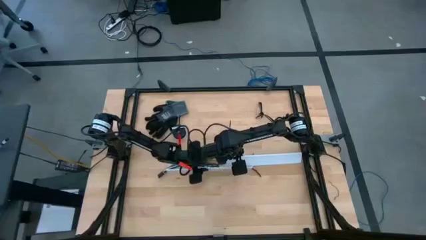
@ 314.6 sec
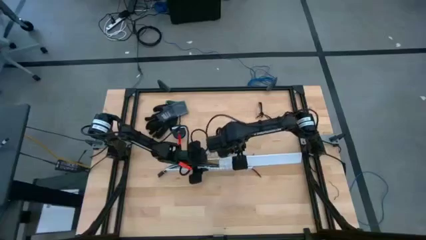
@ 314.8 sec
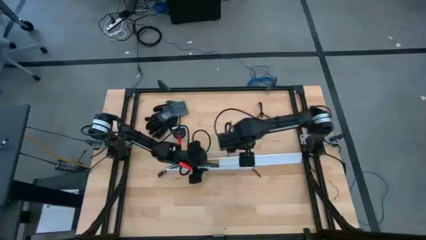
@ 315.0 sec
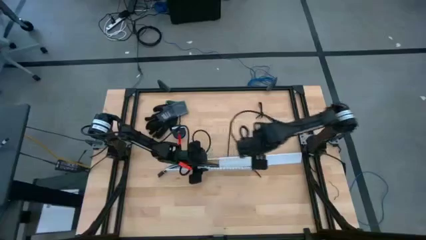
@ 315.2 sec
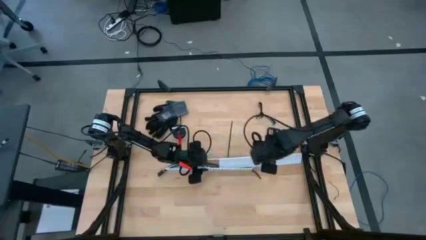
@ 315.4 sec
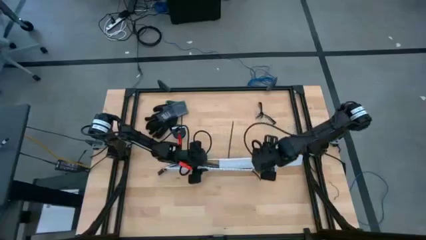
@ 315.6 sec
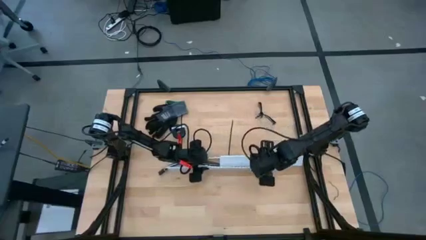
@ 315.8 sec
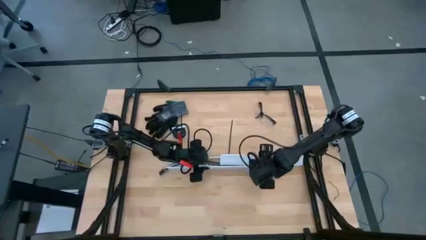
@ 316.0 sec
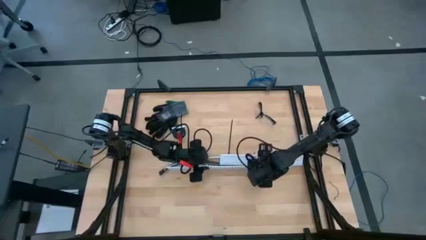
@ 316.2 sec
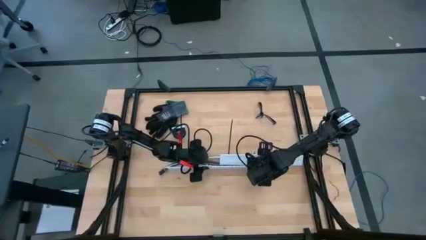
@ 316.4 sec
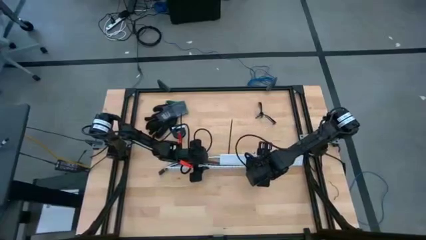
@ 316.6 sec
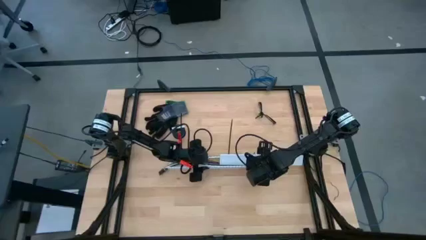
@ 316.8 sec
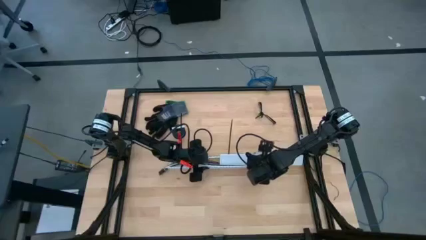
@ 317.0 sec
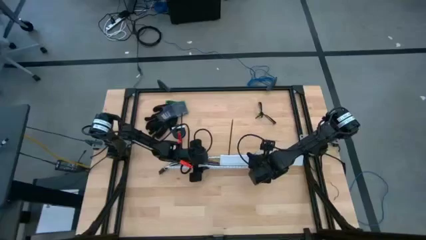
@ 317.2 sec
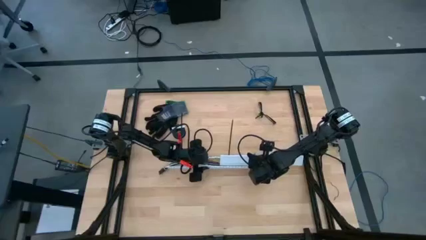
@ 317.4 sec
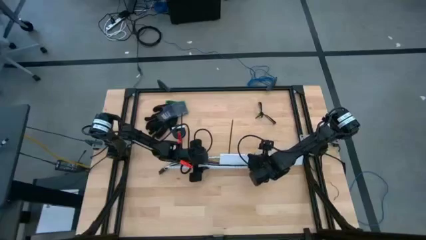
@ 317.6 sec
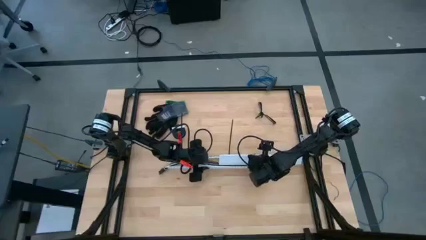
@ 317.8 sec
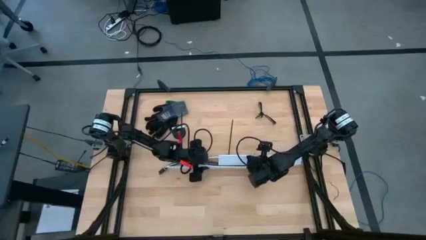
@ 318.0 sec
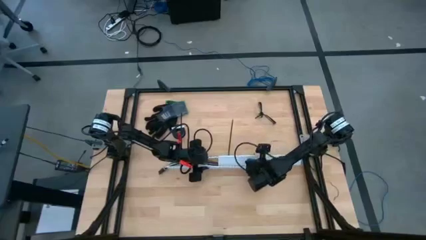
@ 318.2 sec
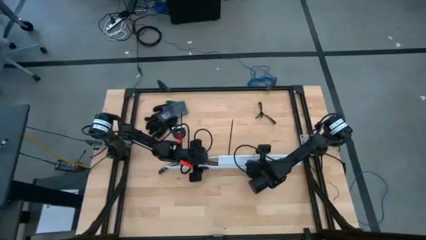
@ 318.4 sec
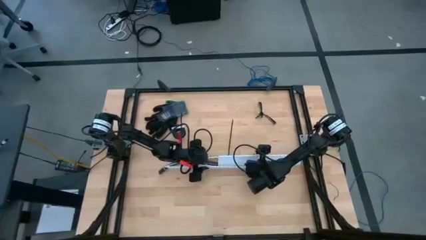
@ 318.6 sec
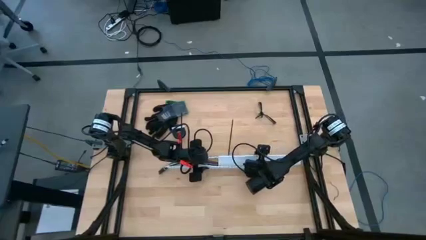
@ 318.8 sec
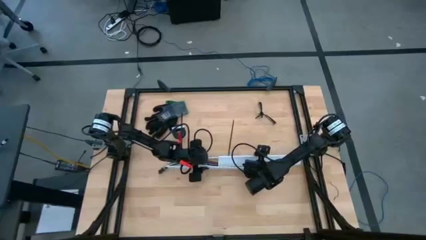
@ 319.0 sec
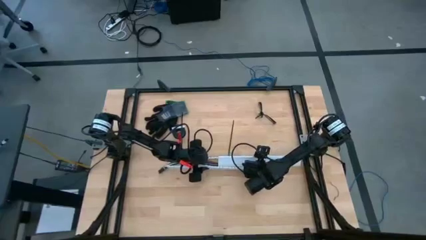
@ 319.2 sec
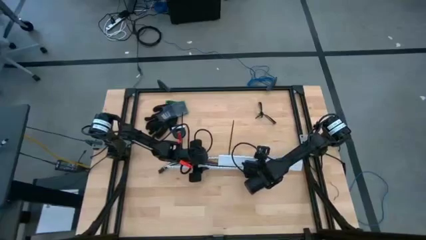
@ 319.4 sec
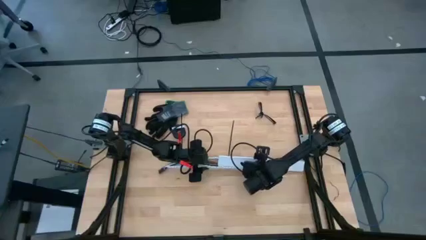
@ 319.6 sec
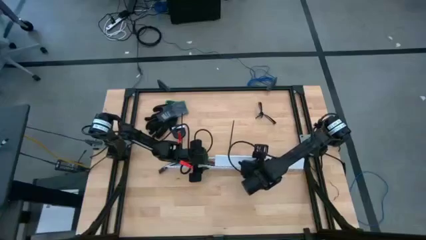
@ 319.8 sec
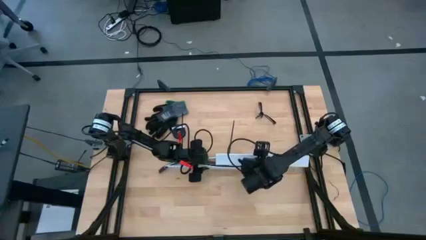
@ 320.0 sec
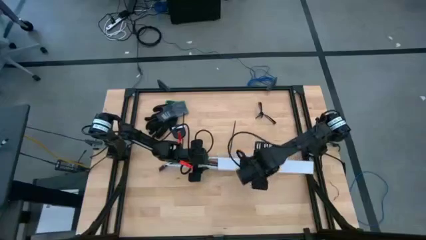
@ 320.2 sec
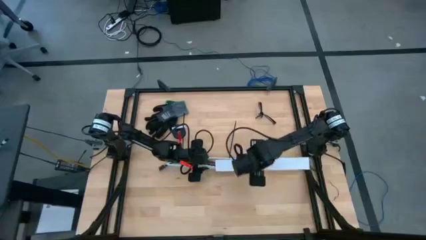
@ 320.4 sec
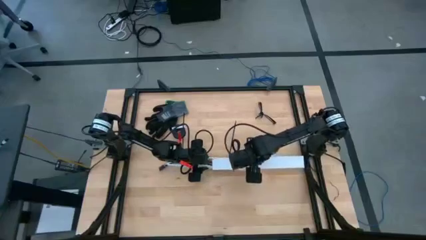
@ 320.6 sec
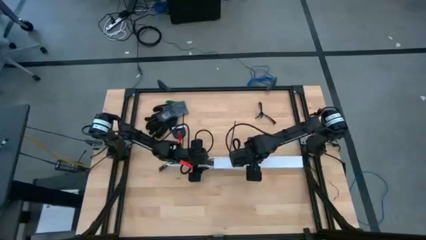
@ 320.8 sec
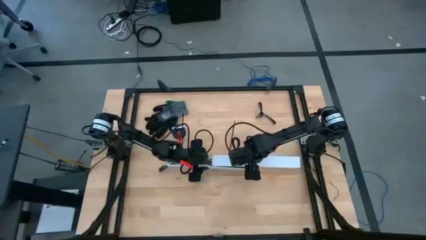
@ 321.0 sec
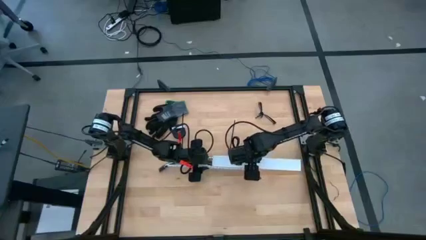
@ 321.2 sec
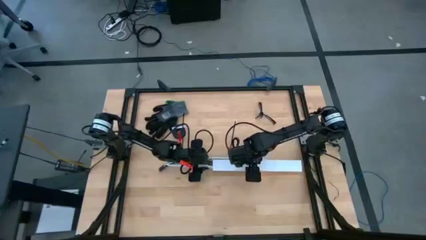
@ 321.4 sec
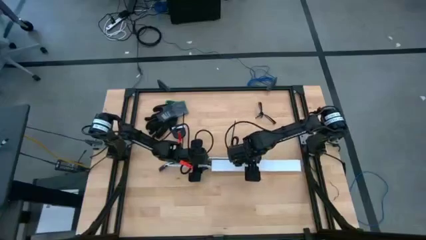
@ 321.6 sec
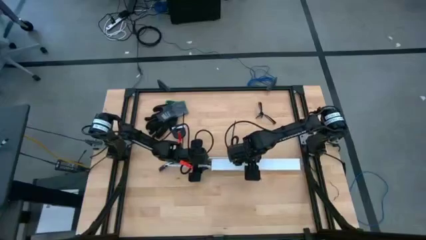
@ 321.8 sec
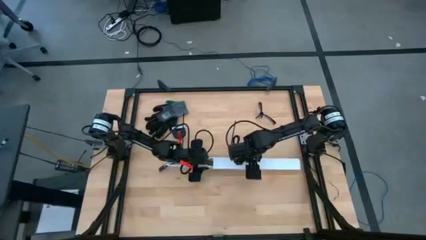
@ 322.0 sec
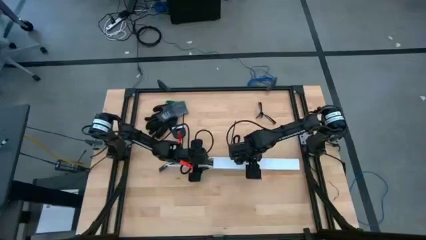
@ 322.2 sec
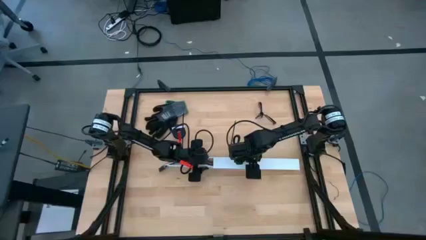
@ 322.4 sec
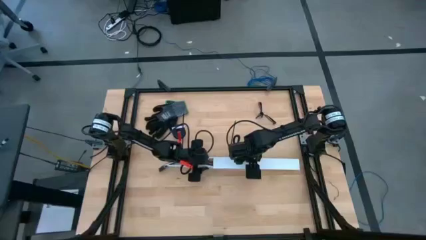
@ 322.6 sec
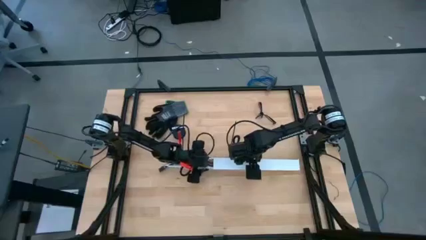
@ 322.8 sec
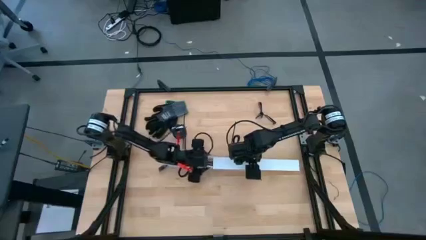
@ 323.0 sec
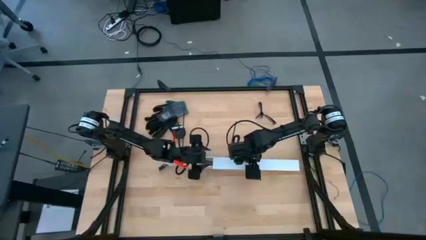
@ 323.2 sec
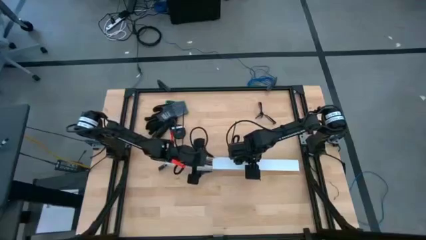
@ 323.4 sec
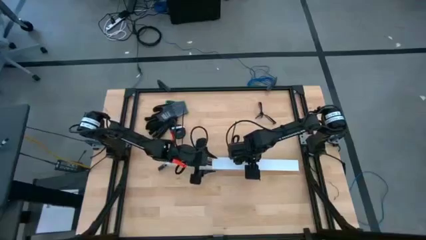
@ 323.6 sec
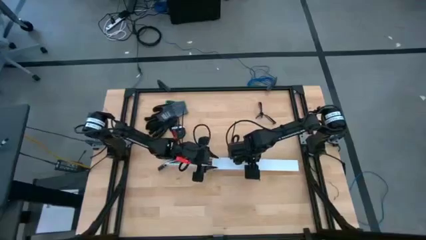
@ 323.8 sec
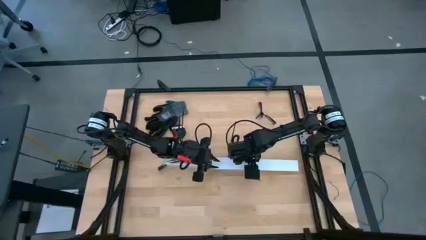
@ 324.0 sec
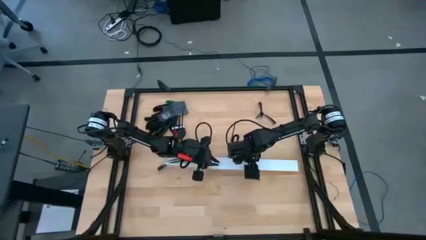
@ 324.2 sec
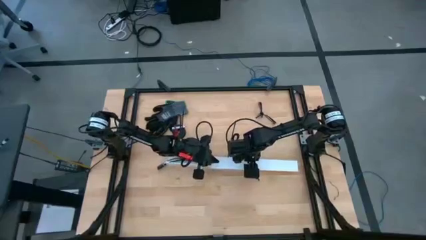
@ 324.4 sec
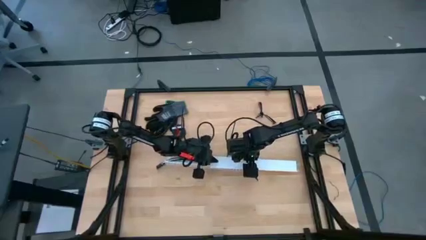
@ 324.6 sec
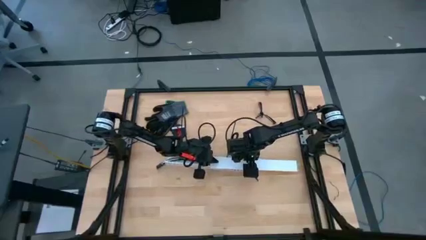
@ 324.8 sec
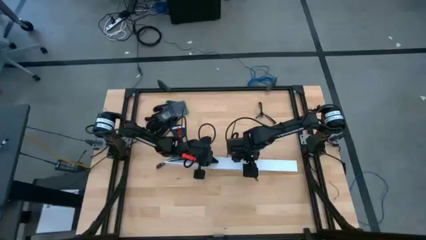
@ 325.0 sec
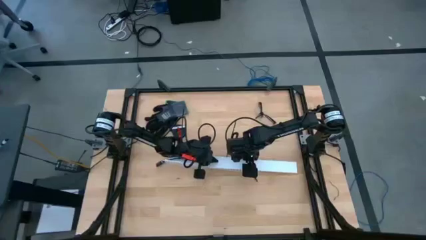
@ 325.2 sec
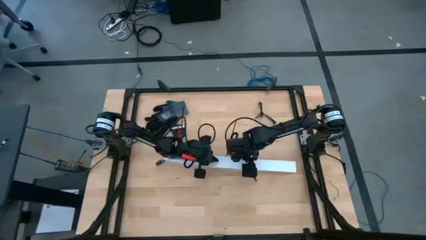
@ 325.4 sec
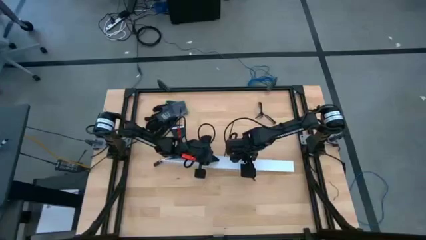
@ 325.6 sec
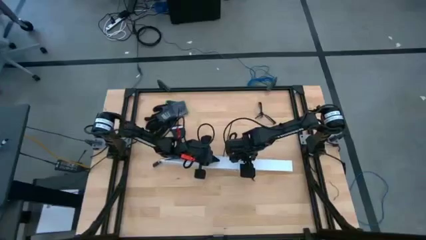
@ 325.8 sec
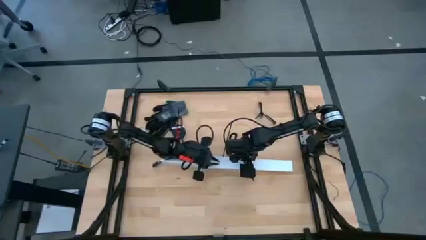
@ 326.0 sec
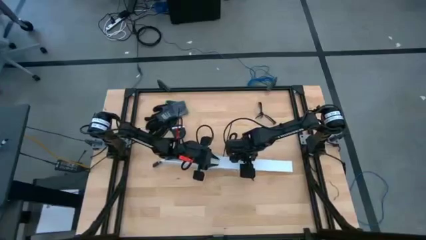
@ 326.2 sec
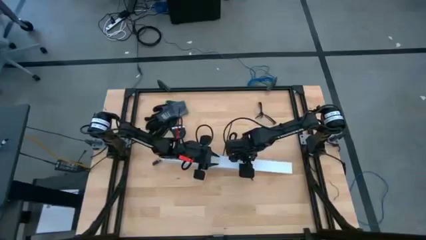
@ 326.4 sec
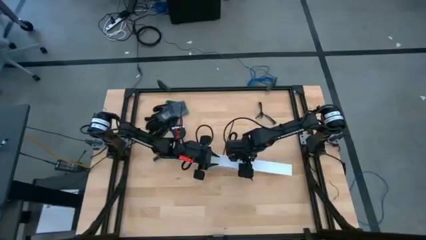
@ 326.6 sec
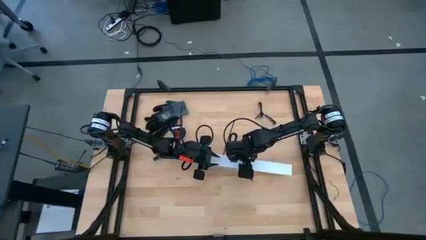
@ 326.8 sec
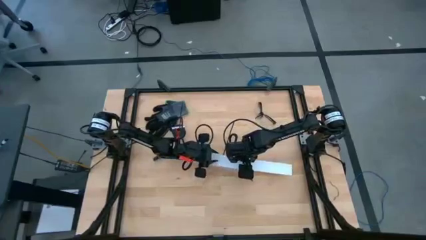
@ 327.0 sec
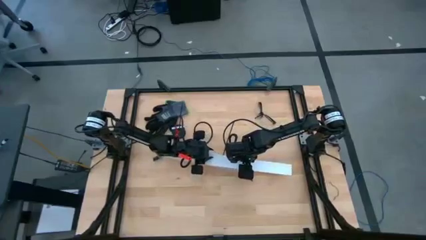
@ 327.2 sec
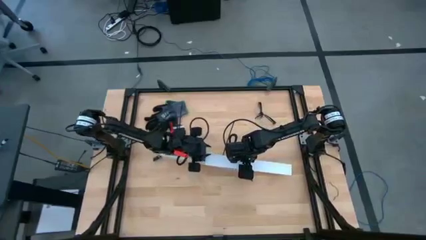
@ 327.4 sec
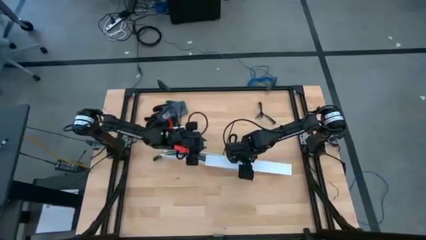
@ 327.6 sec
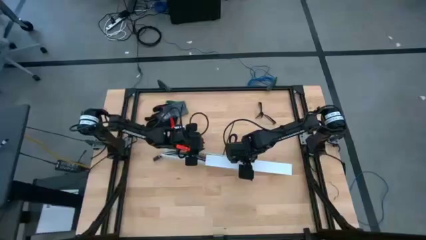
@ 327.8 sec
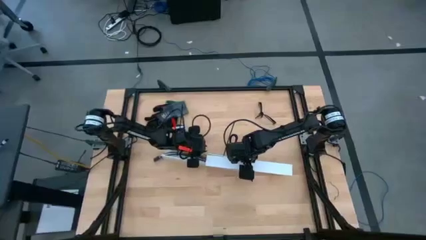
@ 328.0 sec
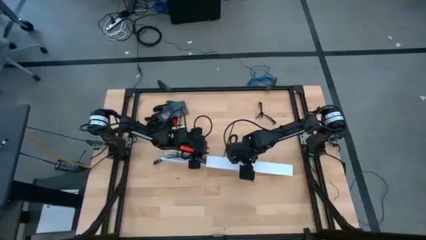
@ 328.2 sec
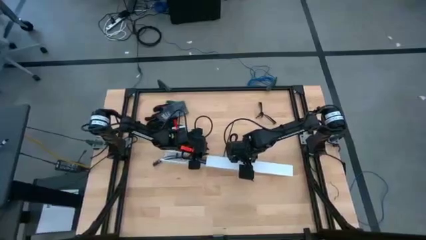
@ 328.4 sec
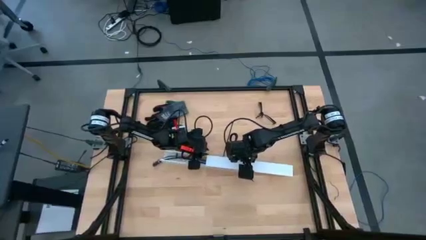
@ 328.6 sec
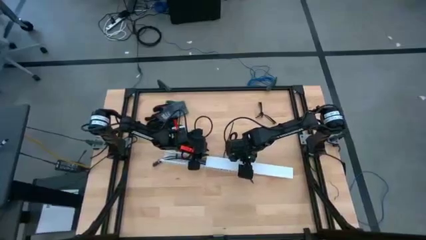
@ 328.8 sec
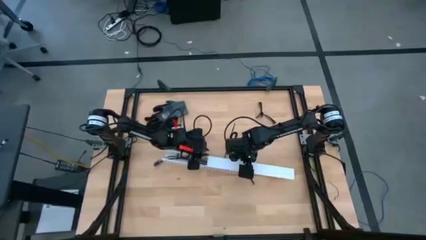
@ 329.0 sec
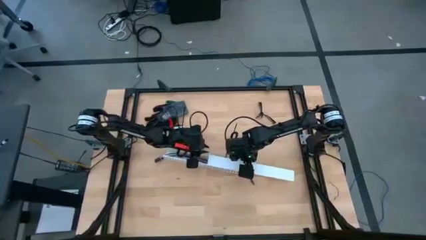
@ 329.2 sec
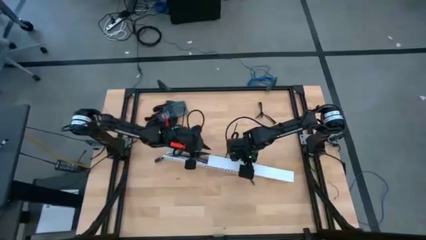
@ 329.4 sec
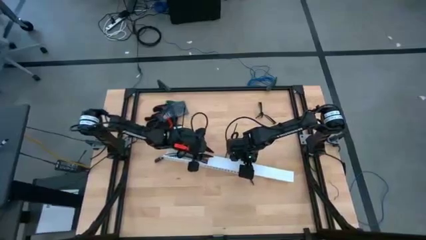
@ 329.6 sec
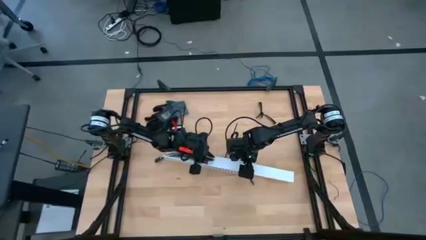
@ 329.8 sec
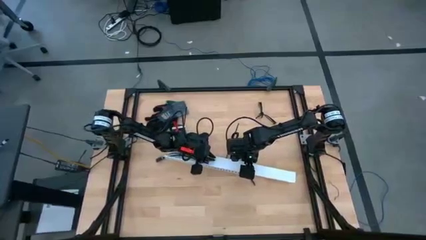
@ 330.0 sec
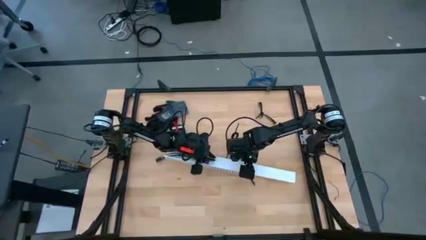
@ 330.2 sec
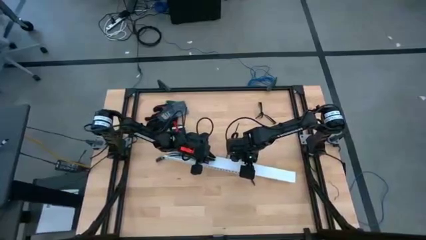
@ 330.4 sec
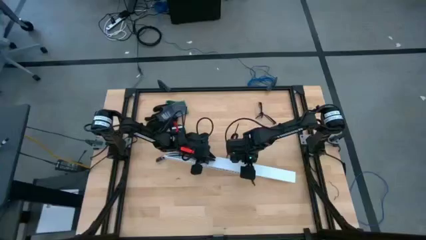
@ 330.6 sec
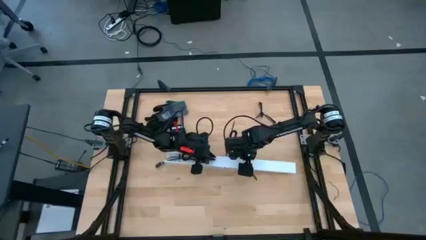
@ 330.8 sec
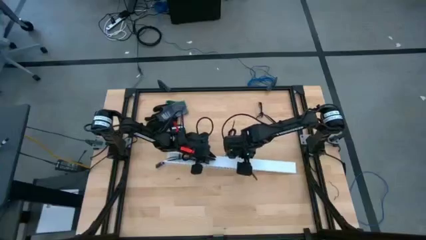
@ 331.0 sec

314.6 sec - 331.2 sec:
Task: Ziptie cables
Close the white cable duct cover
